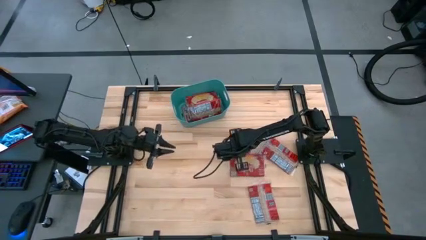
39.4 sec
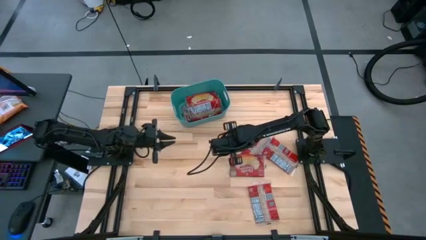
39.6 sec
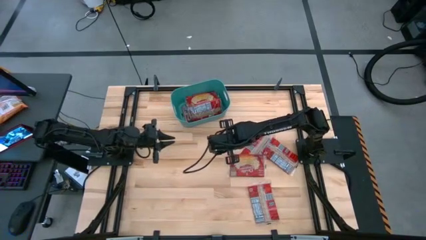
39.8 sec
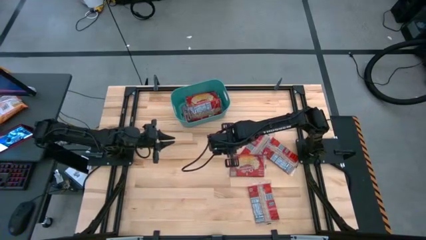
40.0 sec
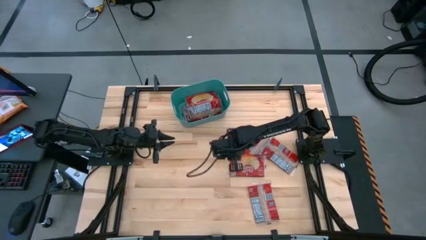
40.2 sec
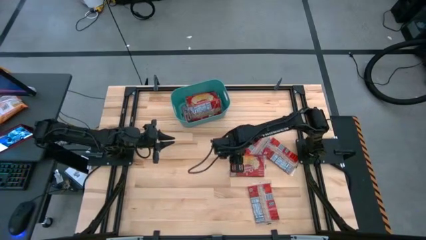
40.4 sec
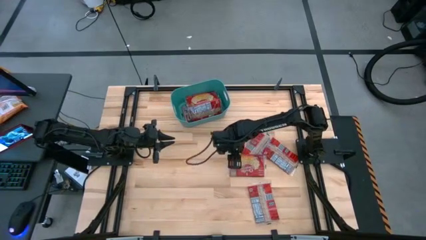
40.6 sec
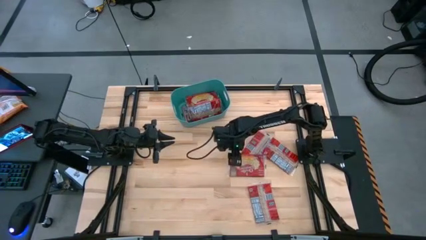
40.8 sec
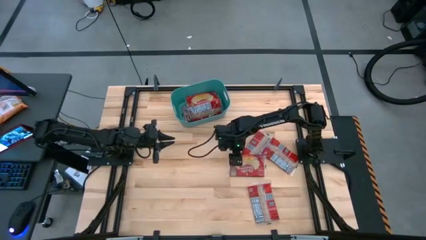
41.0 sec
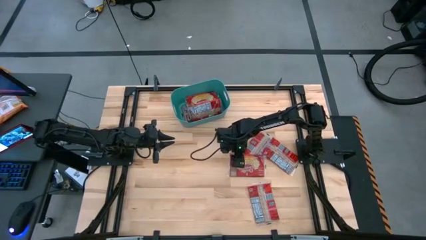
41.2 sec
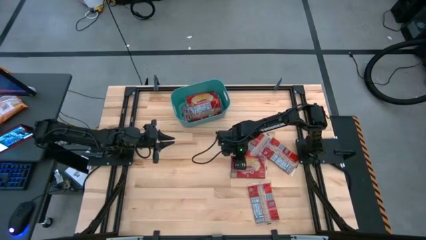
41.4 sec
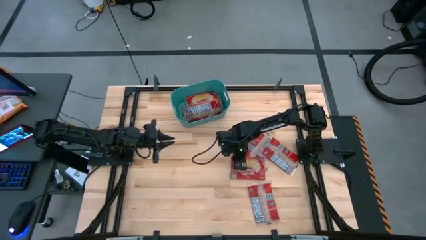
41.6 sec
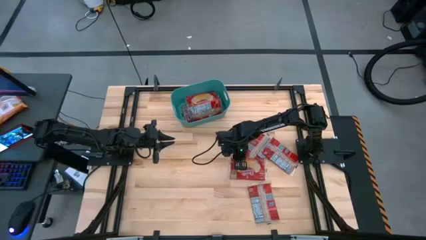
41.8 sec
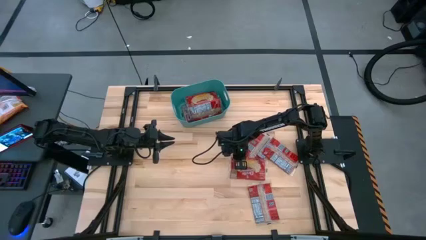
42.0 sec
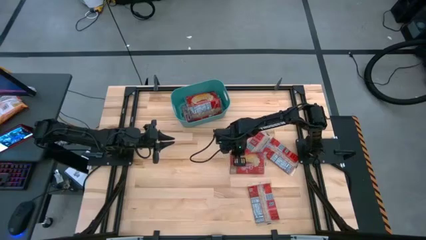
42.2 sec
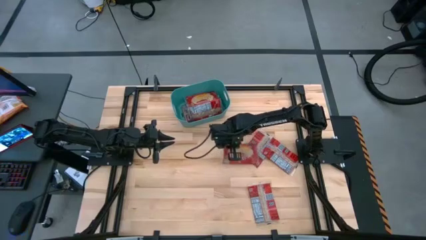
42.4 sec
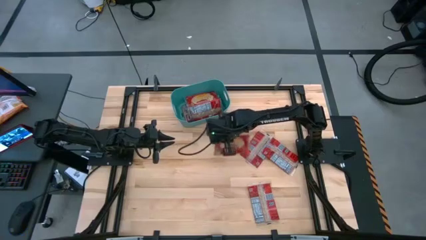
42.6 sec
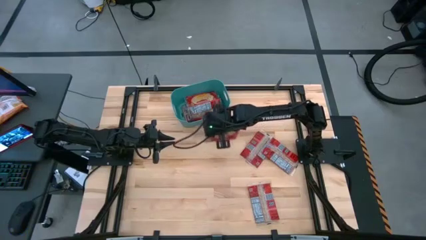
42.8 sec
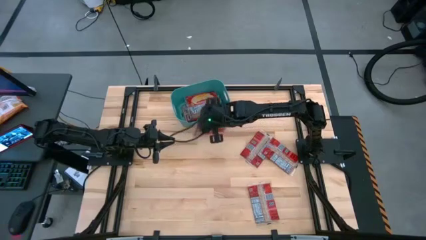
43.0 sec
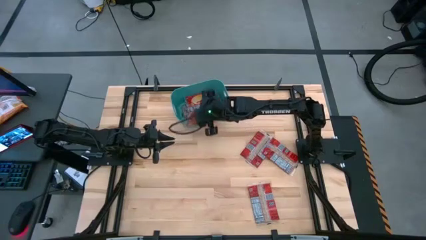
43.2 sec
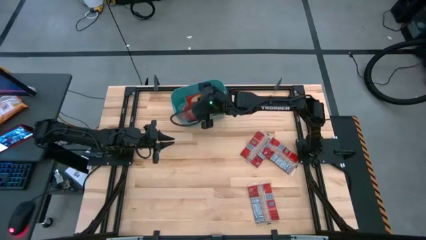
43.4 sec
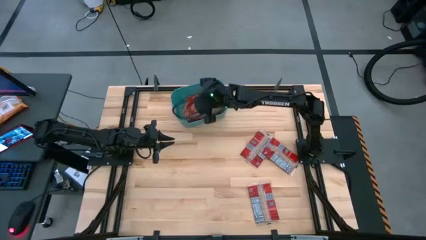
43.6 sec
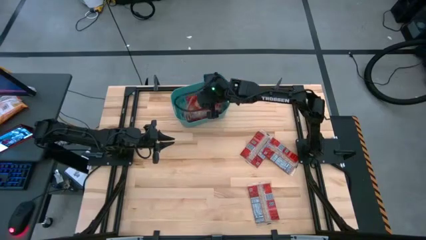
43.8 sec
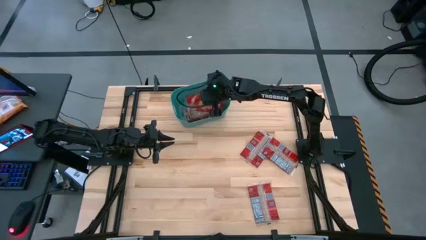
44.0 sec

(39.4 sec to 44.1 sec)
Task: Sort popcorn bags into baskets
Put the red popcorn bag into the green bin

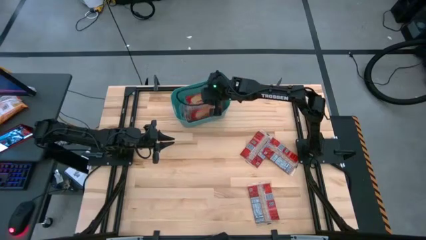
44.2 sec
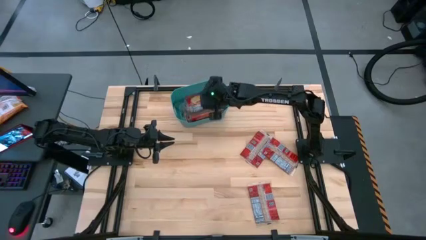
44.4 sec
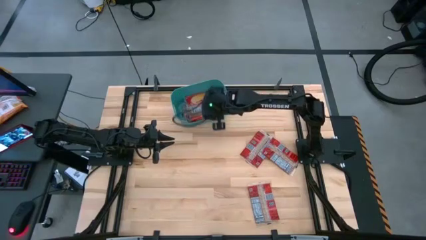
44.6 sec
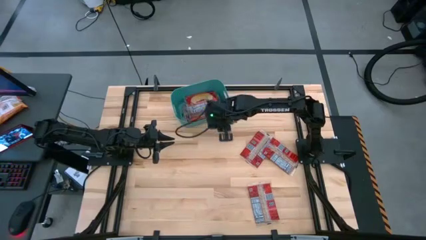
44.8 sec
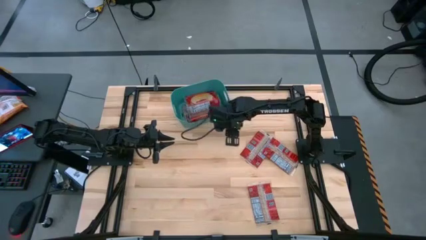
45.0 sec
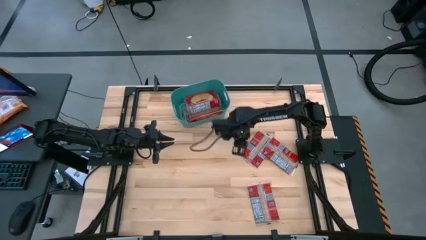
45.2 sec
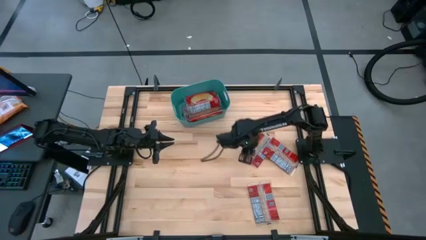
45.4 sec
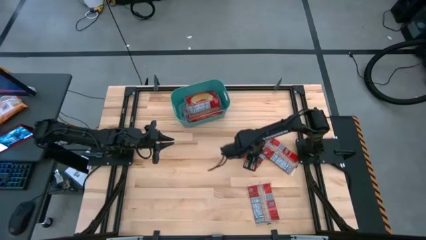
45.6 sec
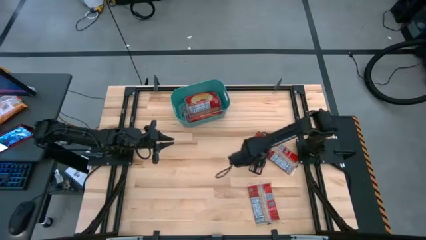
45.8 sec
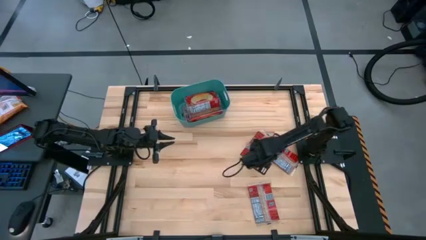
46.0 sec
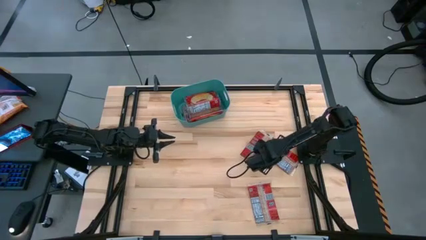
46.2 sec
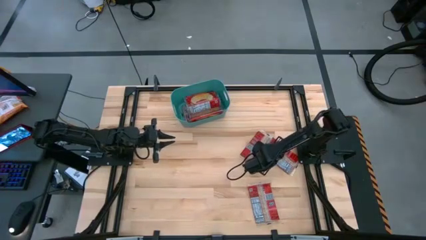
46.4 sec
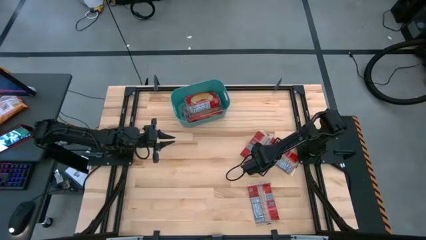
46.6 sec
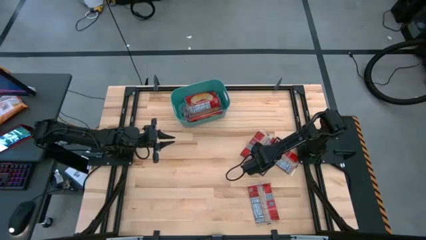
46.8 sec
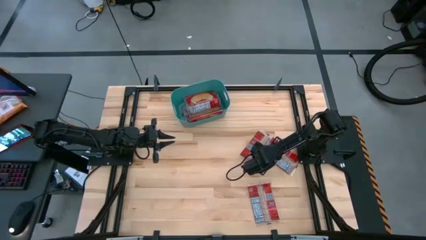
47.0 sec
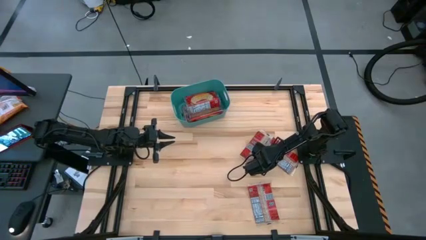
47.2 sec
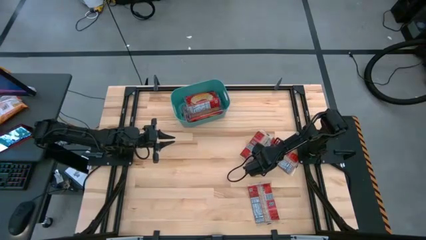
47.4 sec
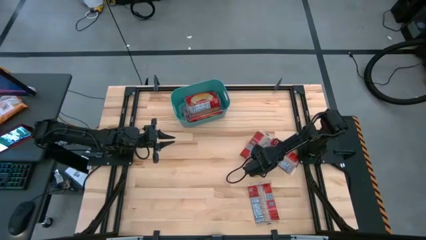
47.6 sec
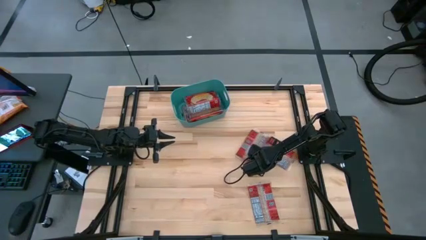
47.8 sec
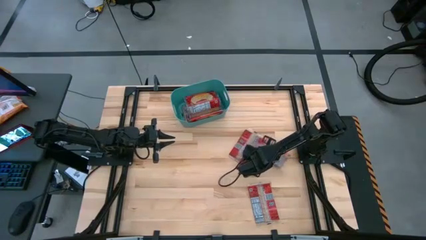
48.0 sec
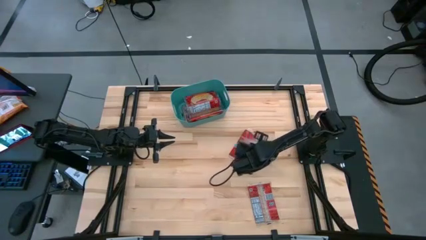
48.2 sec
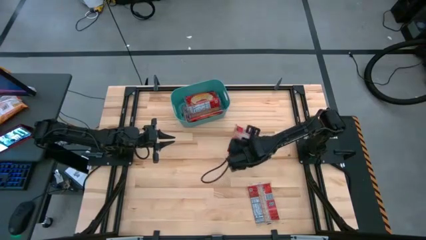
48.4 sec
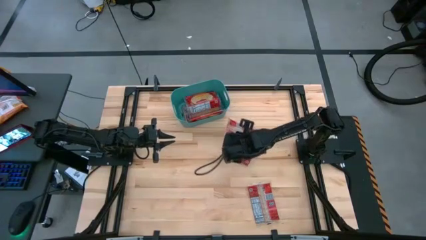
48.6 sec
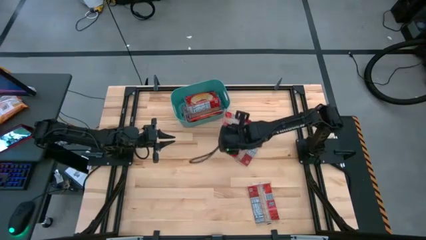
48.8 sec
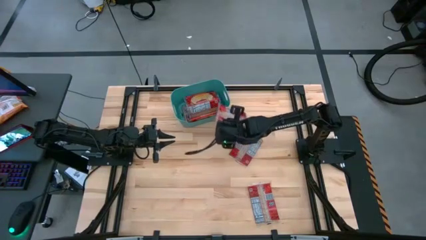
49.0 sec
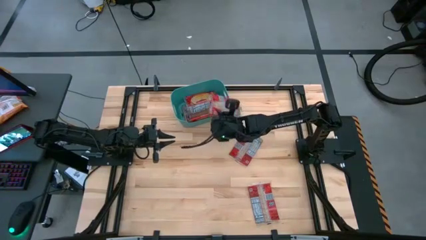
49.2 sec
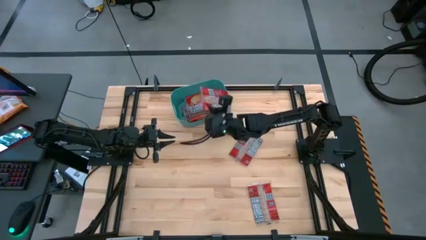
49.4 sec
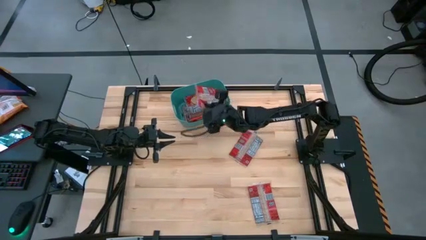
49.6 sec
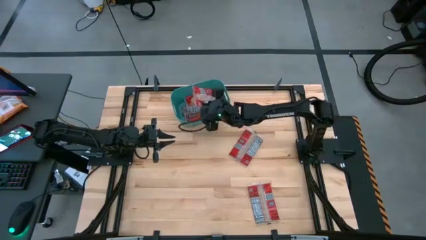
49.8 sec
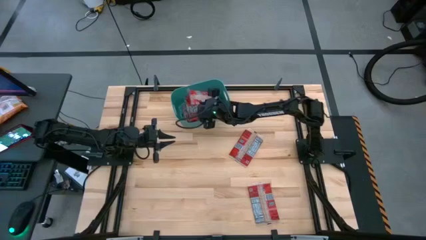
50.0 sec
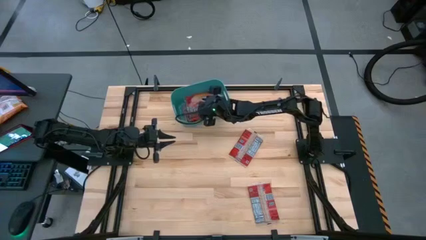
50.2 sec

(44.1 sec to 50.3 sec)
Put the red popcorn bag into the green bin

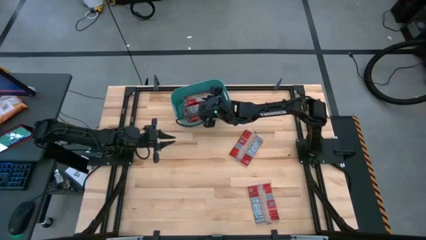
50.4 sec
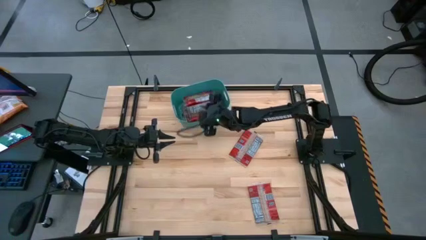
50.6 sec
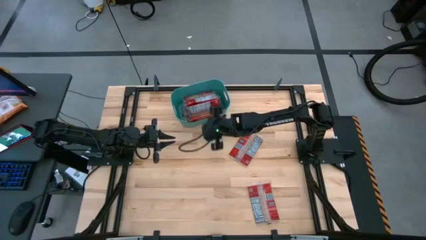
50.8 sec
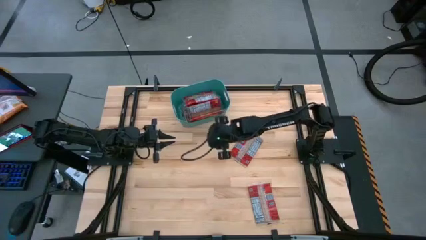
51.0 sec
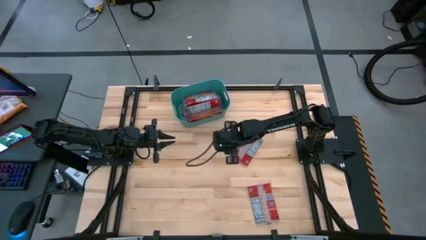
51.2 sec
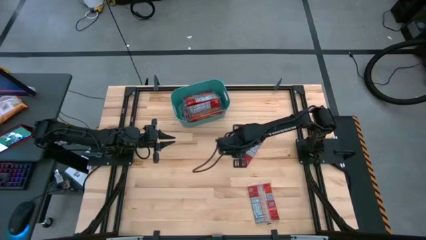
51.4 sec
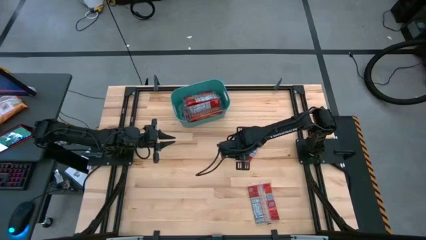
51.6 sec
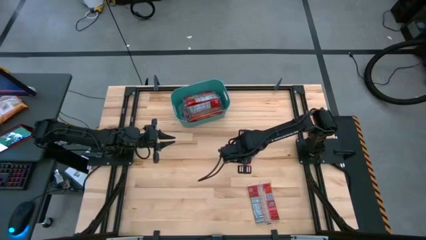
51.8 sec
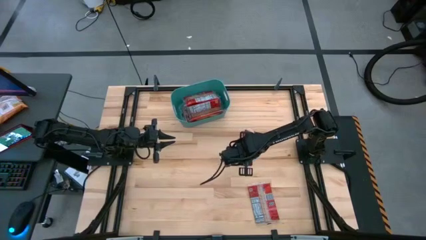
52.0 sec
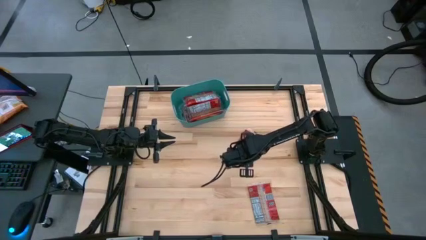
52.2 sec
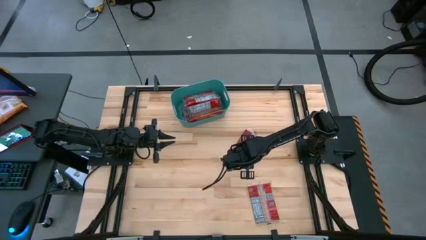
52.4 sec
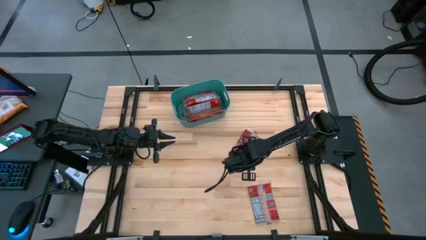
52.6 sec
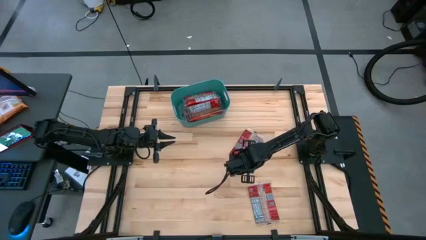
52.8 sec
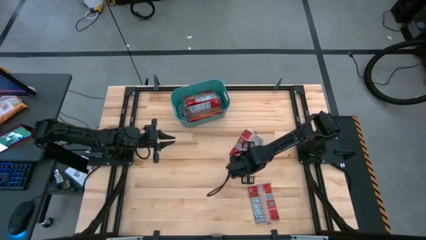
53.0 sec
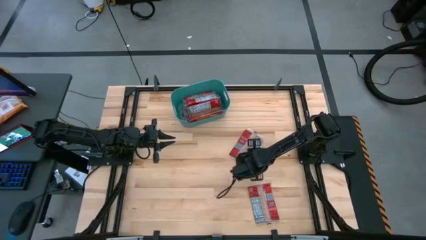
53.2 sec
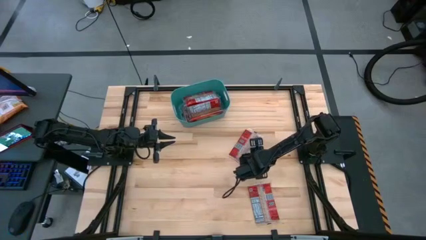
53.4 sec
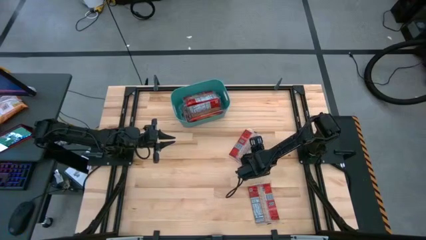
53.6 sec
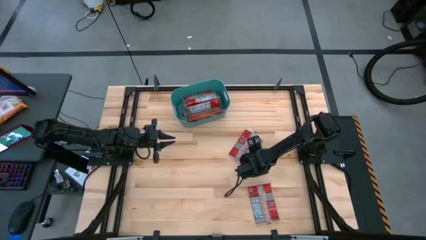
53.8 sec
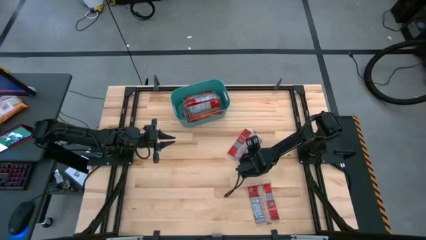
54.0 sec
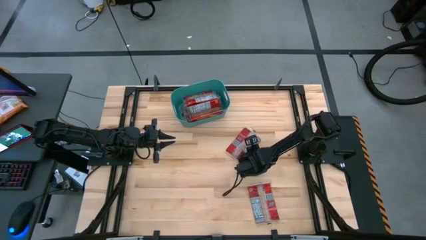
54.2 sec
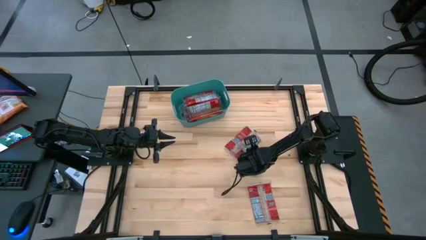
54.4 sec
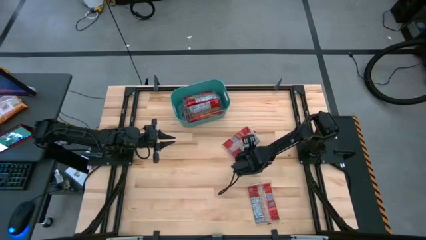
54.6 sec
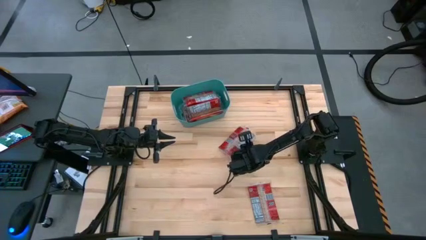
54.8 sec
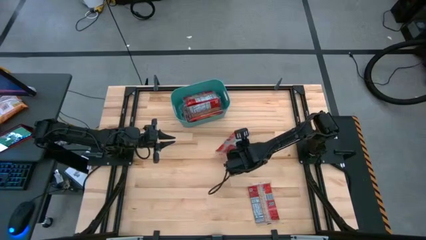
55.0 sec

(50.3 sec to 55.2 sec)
Put the red popcorn bag into the green bin

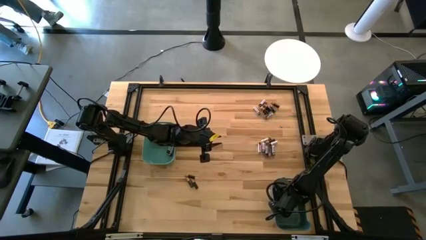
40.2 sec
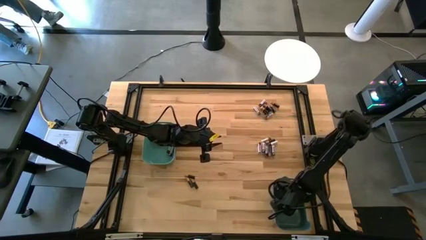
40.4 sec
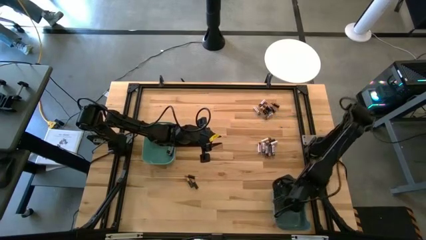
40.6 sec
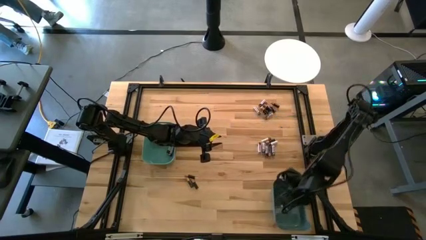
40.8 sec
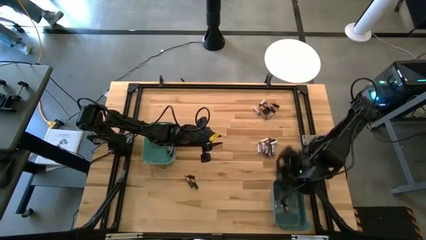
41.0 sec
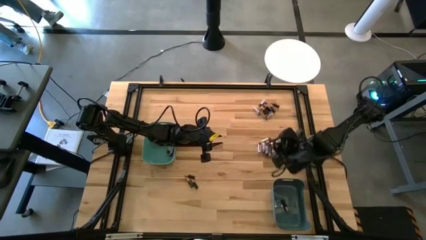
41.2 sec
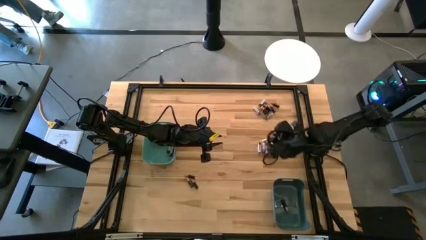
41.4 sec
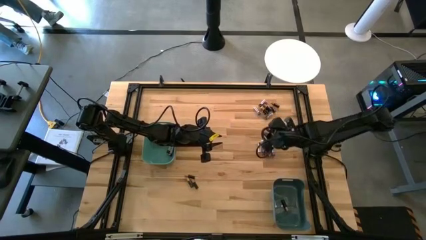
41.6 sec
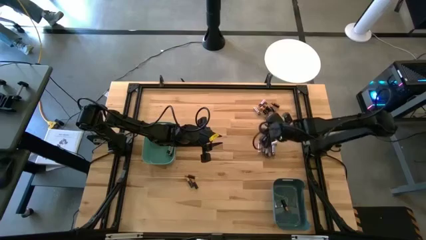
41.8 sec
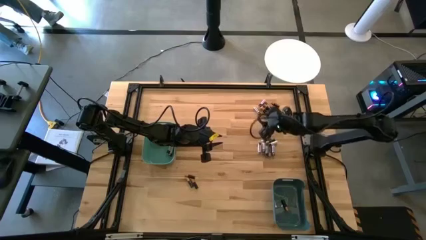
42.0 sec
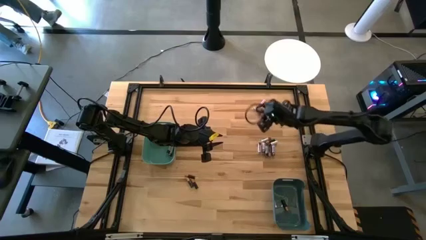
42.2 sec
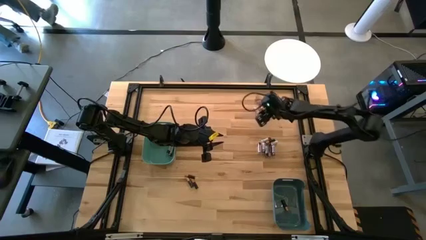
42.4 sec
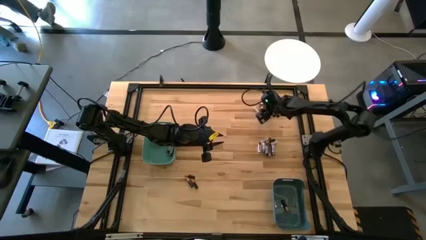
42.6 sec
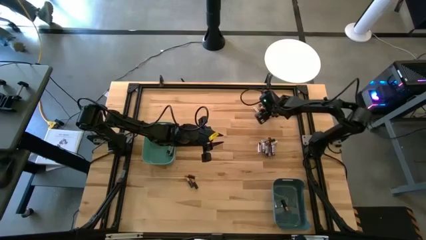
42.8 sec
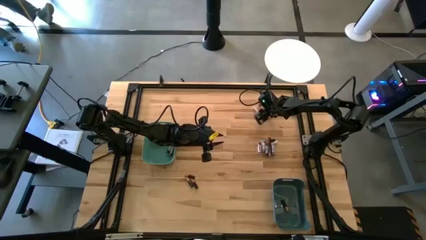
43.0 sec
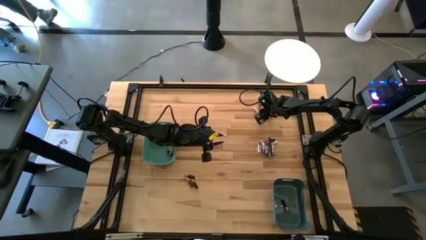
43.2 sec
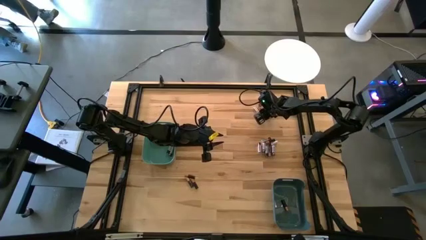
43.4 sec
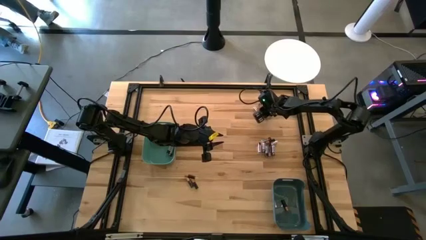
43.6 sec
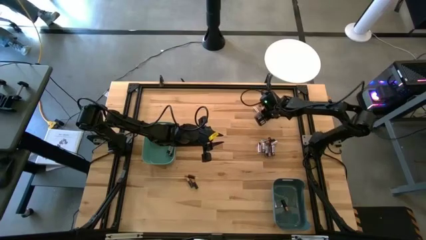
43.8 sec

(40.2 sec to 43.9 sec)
Task: Sort batteries
Put the black battery into the blue bin
